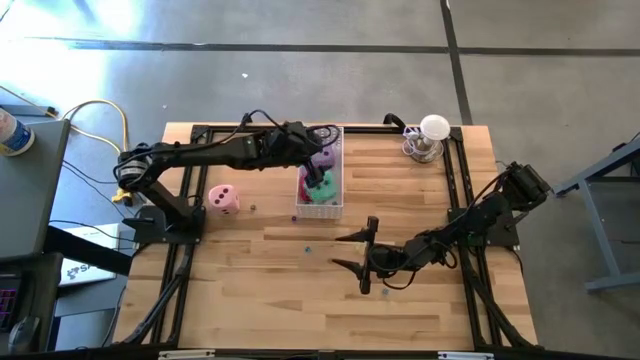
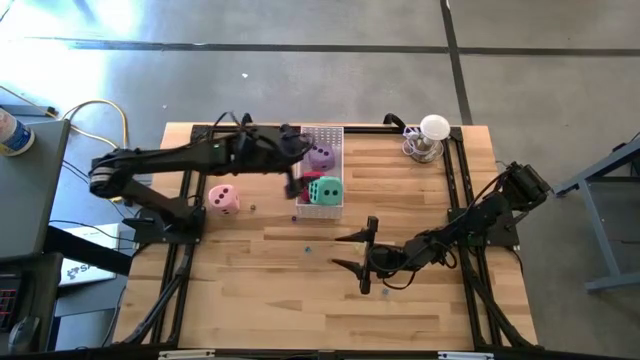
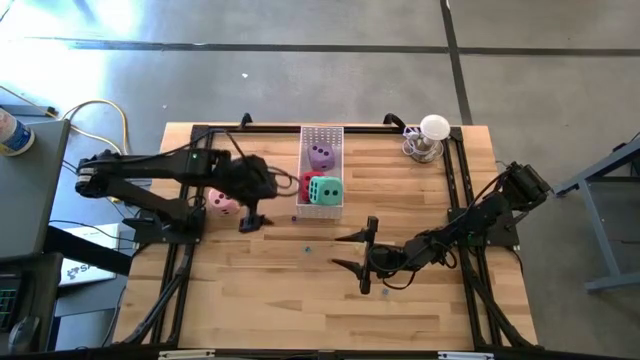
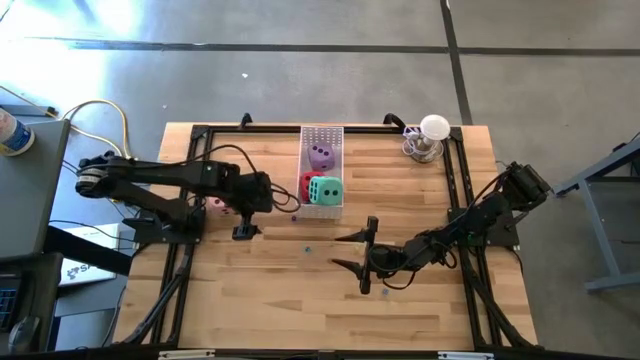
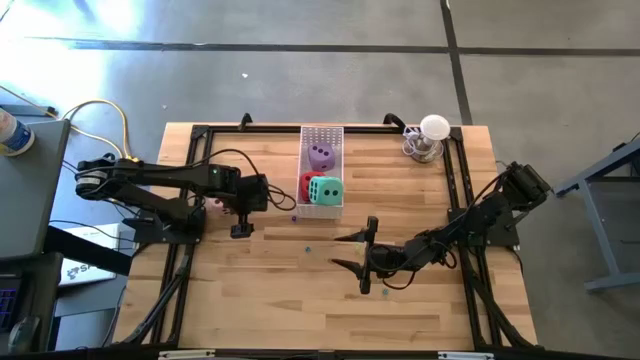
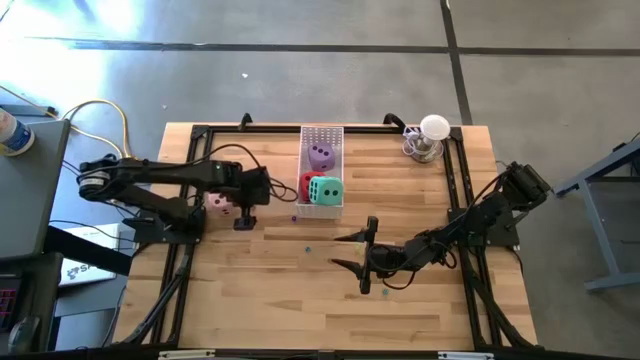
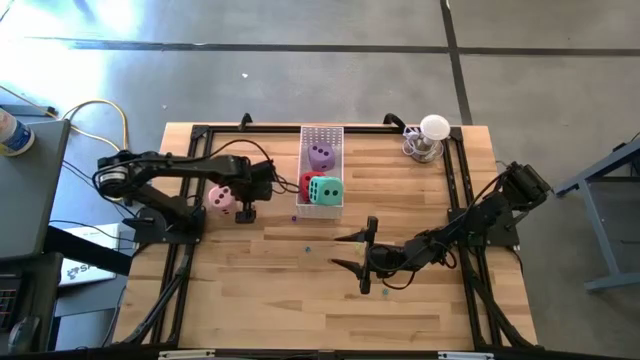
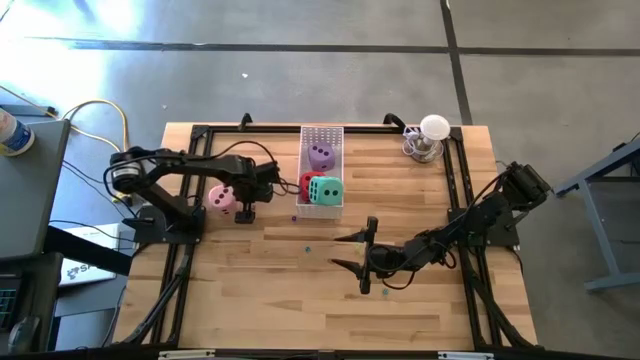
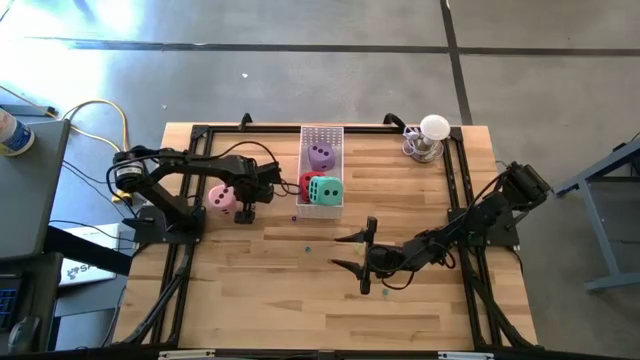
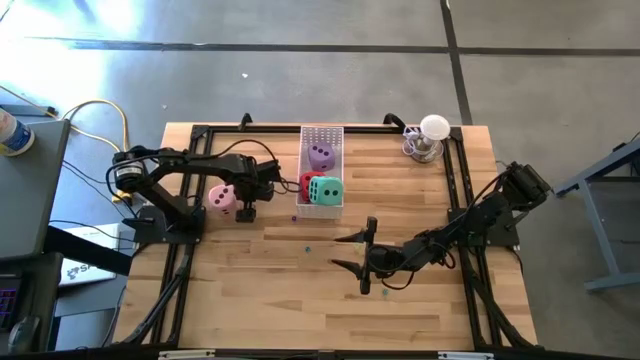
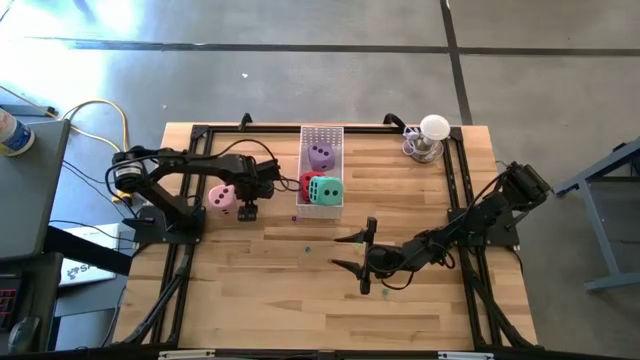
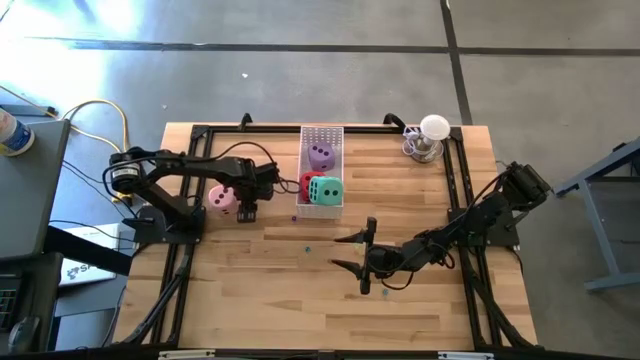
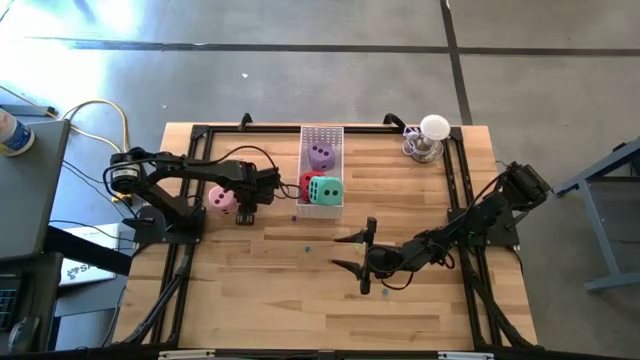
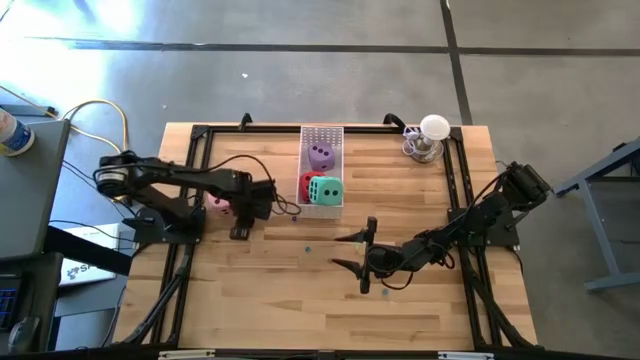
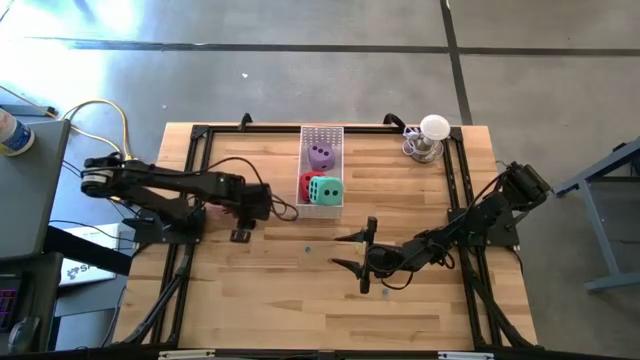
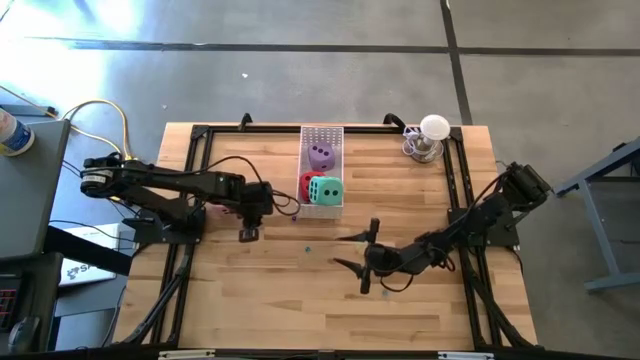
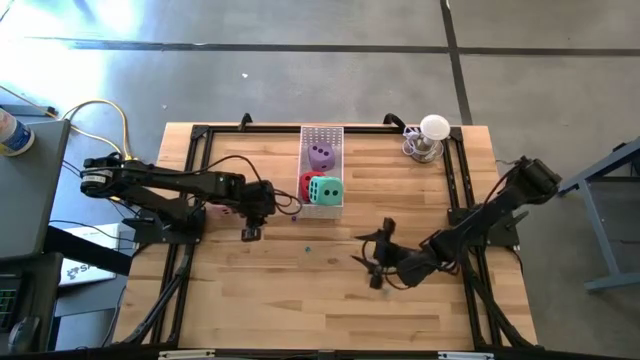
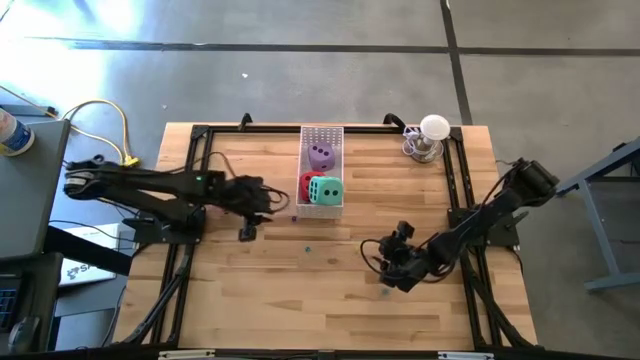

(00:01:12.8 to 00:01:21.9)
Task: Pick & Place Dice
Put the small black die into the bin

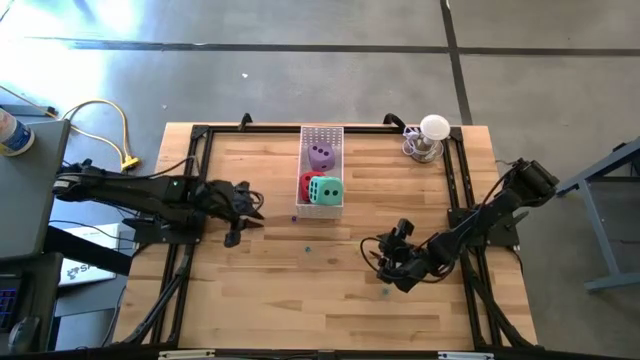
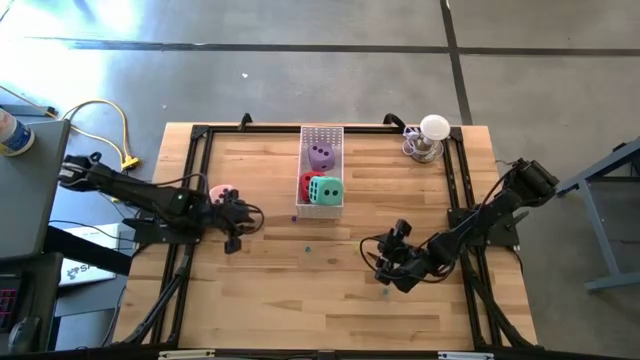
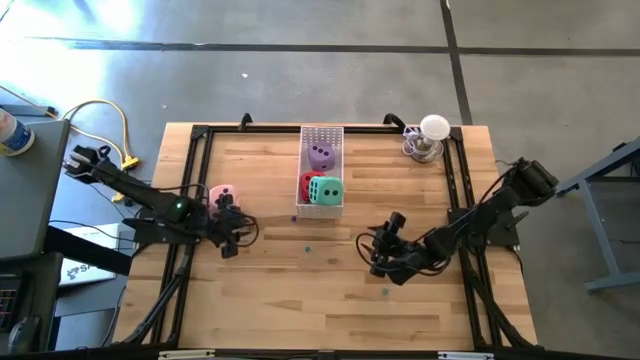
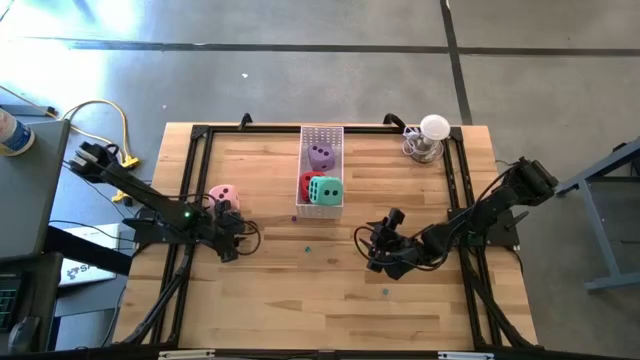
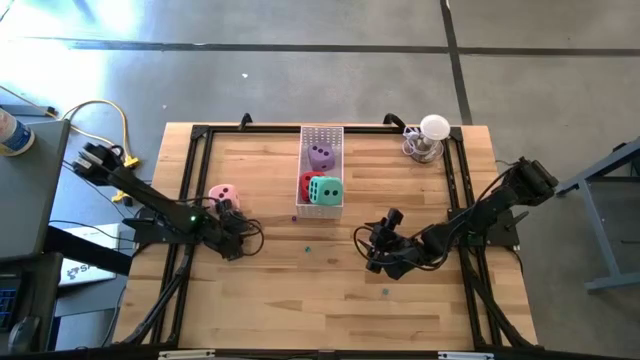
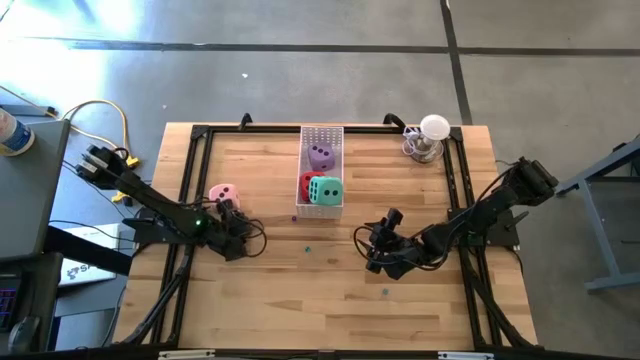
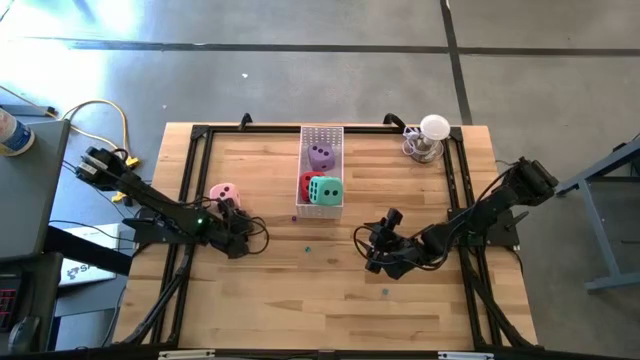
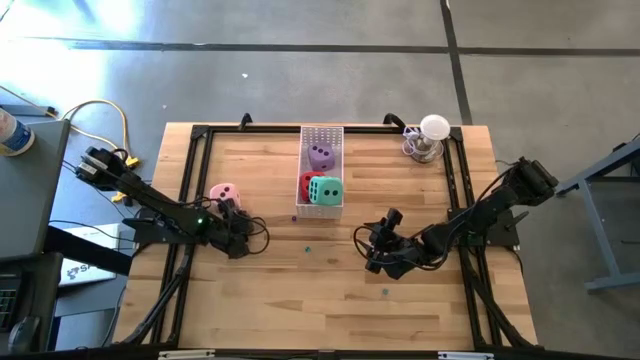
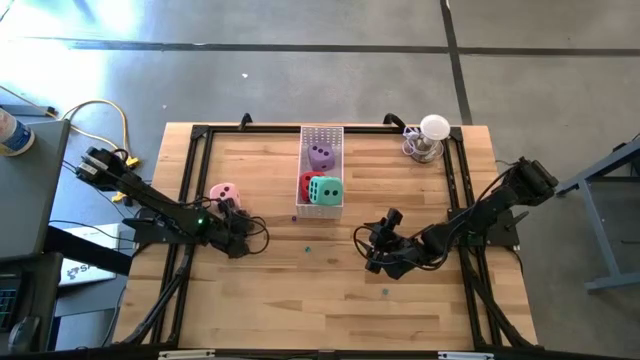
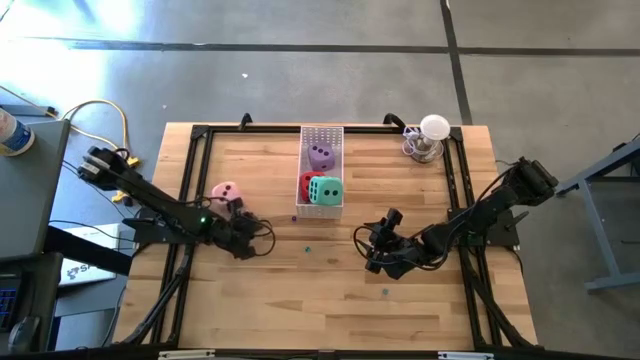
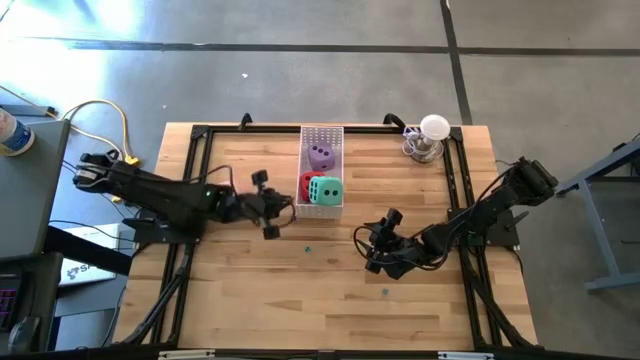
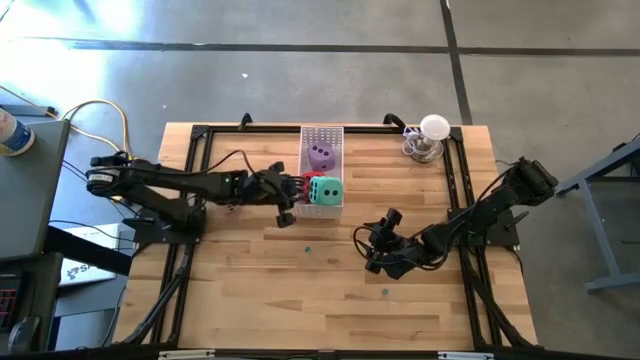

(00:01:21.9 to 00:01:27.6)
Put the small black die into the bin

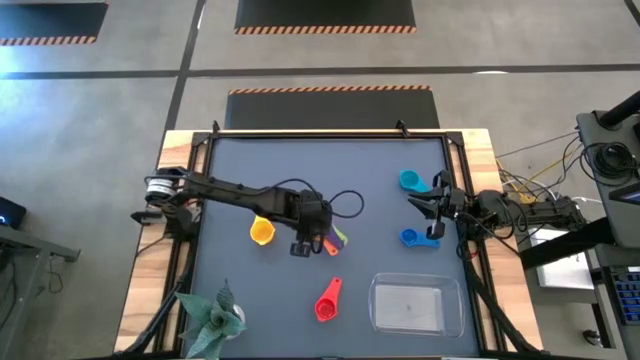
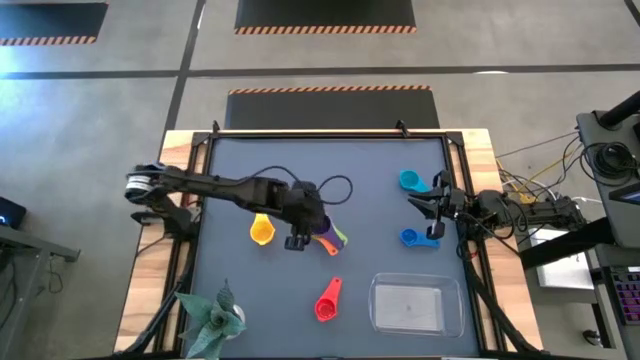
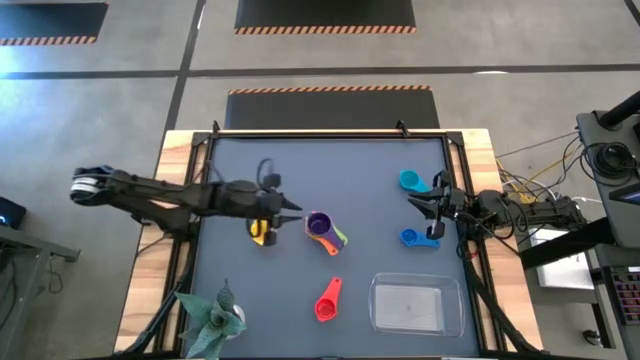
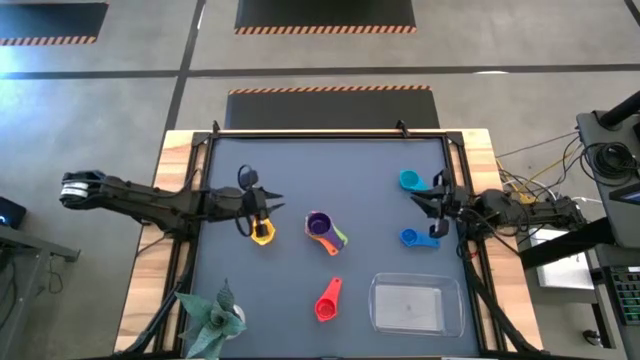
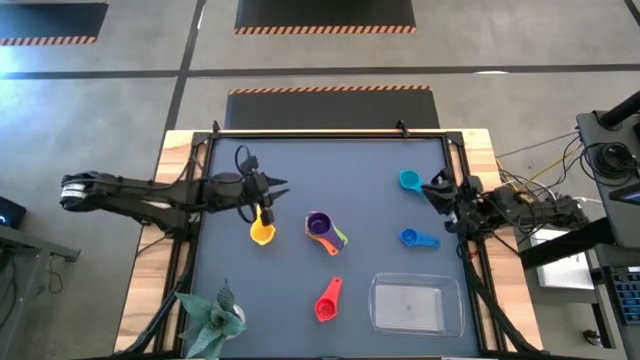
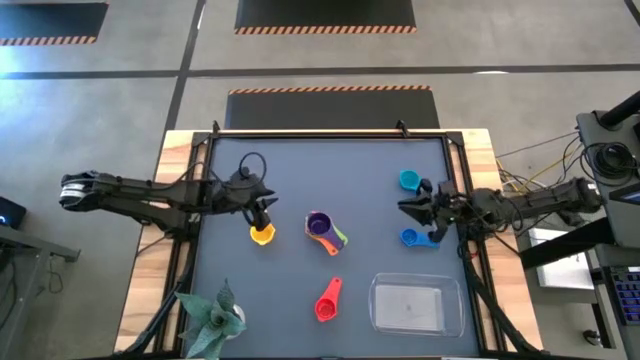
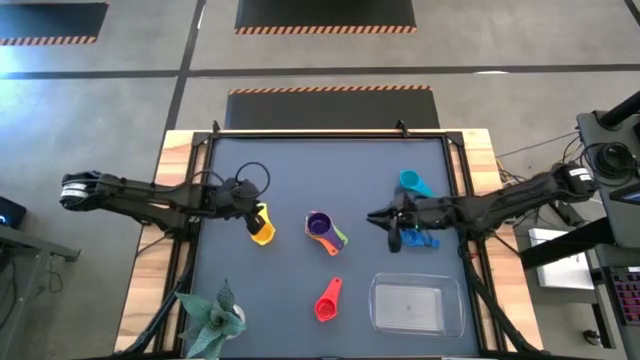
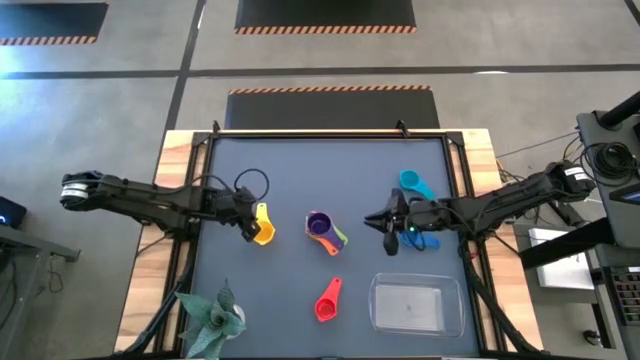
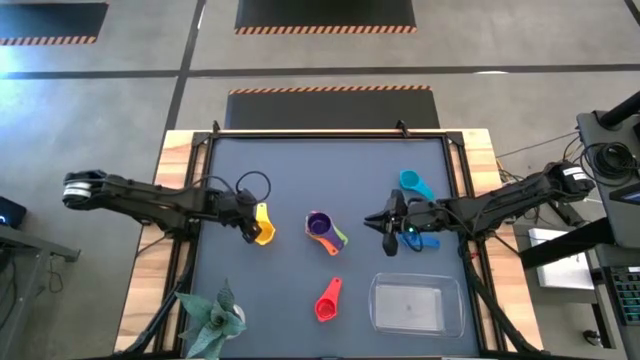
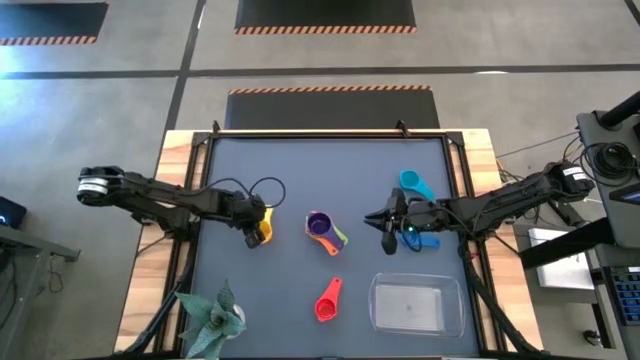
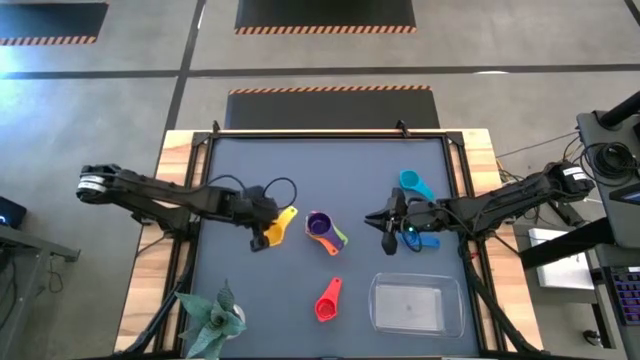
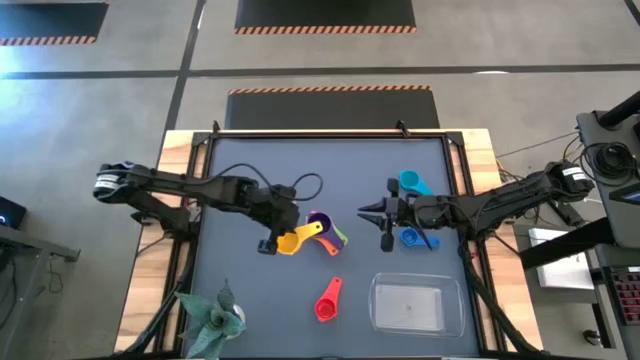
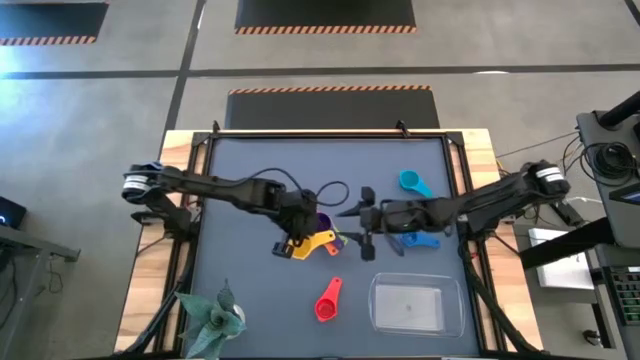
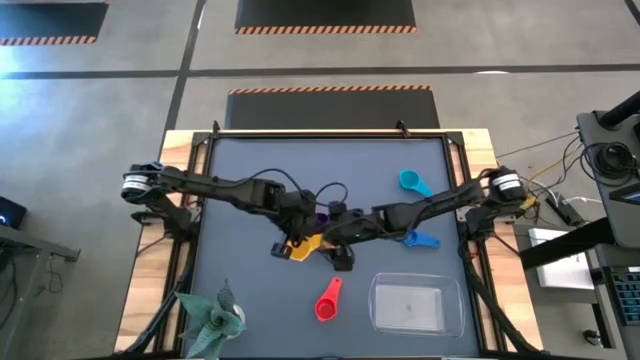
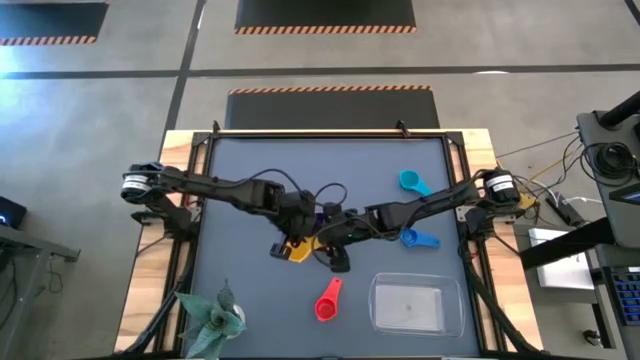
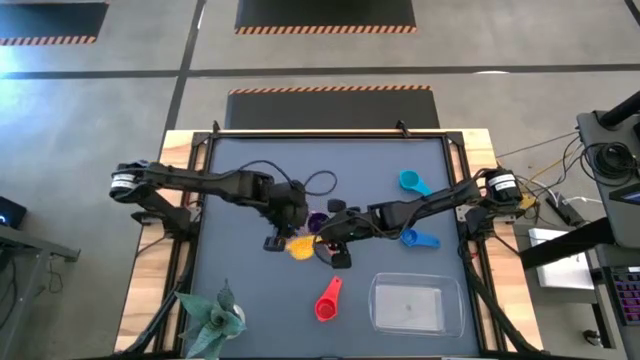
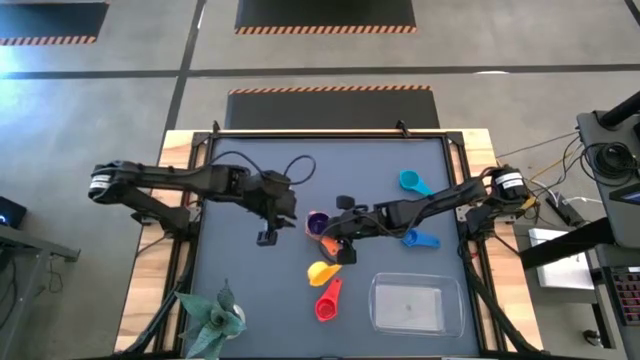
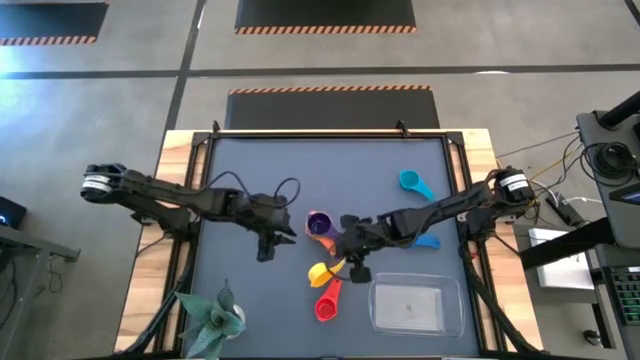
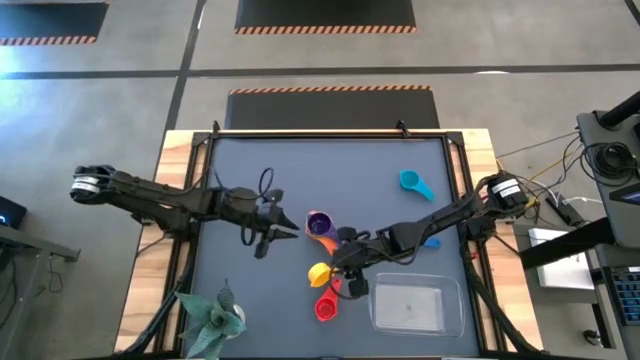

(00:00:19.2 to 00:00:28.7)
Task: Nest measuring cups in basket
Stack the yellow measuring cup on top of the purple measuring cup
